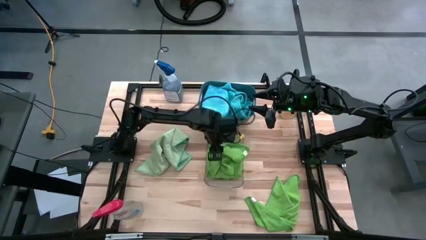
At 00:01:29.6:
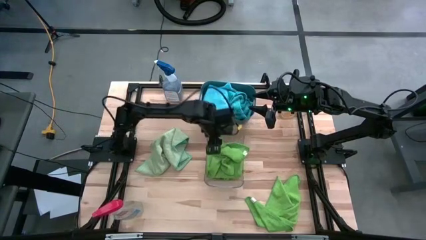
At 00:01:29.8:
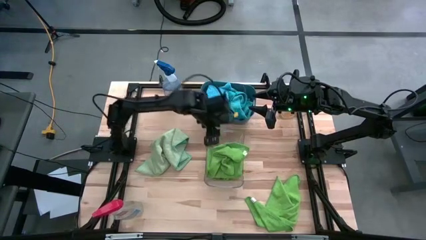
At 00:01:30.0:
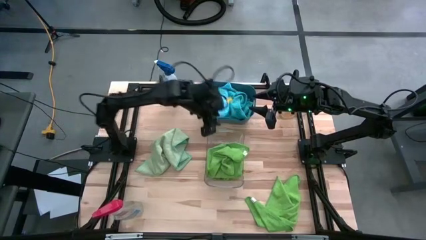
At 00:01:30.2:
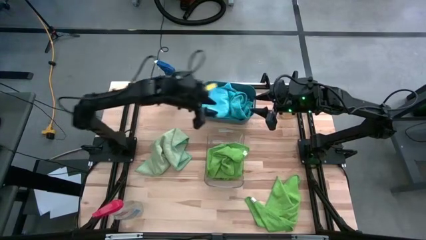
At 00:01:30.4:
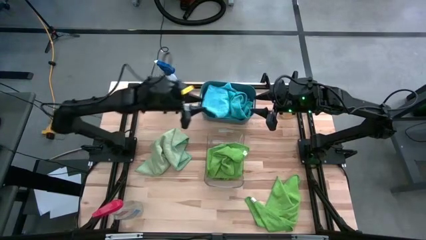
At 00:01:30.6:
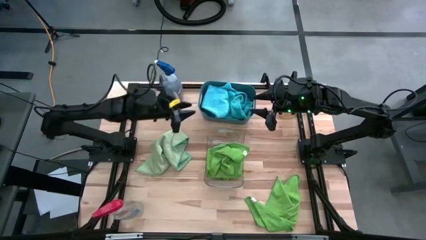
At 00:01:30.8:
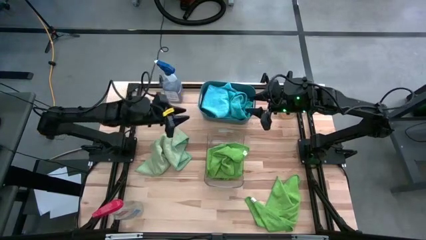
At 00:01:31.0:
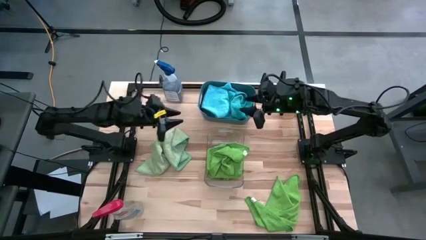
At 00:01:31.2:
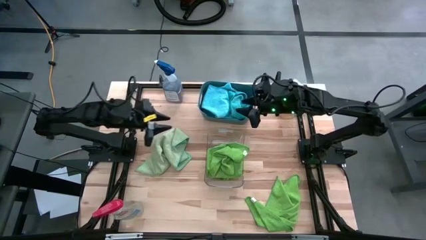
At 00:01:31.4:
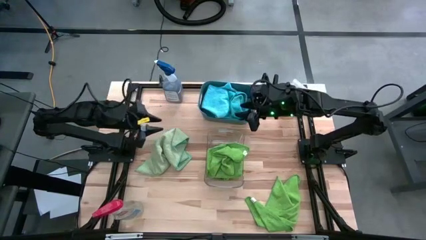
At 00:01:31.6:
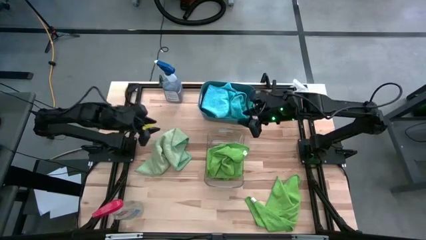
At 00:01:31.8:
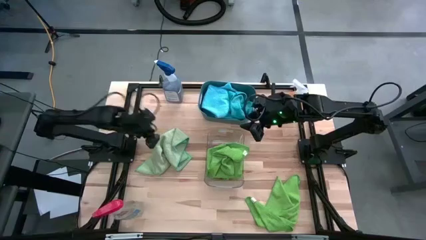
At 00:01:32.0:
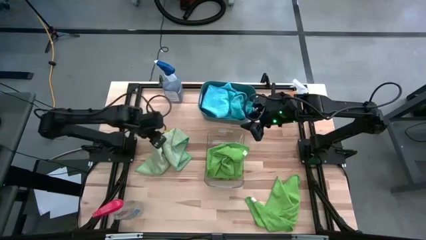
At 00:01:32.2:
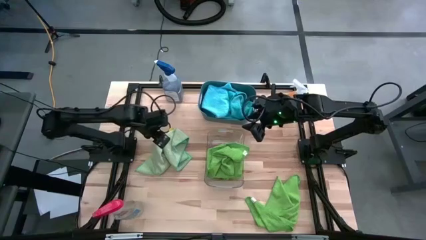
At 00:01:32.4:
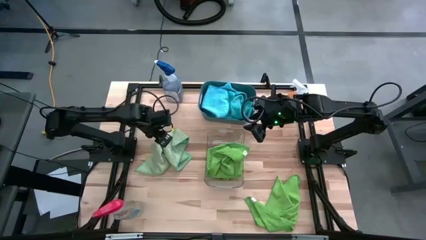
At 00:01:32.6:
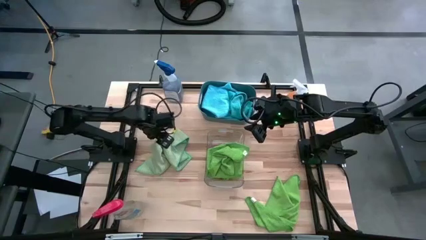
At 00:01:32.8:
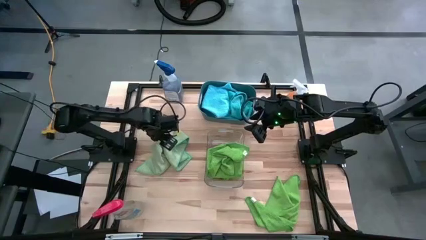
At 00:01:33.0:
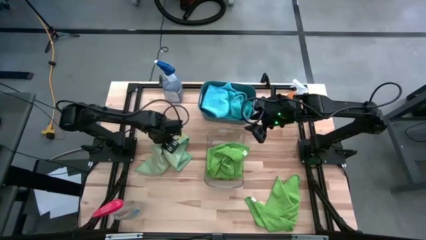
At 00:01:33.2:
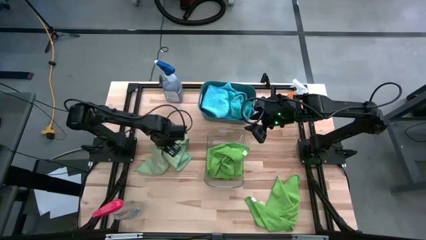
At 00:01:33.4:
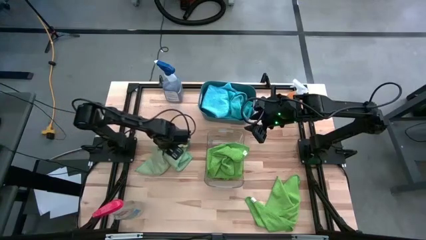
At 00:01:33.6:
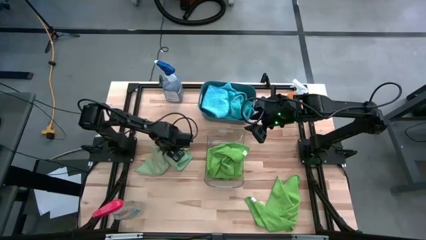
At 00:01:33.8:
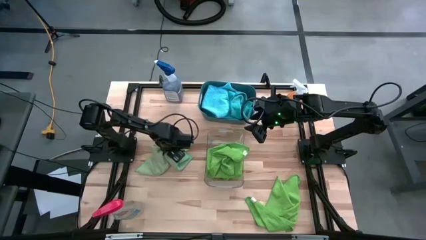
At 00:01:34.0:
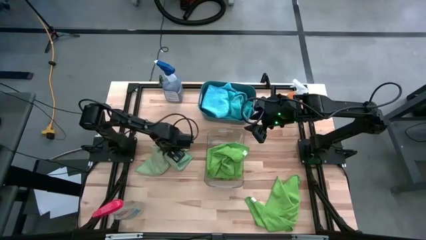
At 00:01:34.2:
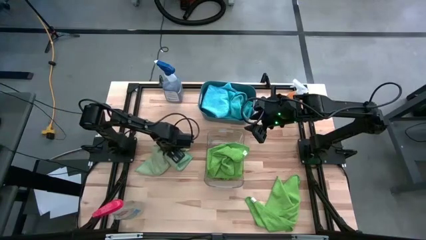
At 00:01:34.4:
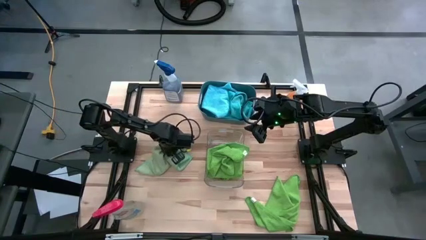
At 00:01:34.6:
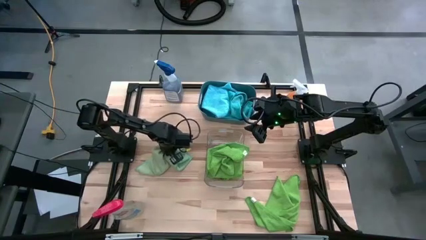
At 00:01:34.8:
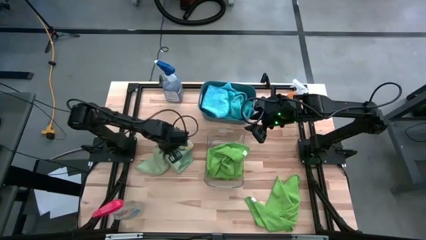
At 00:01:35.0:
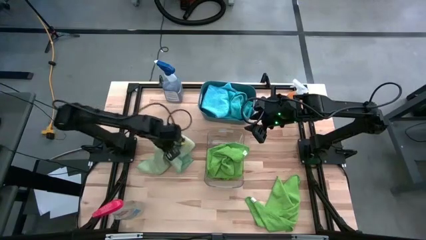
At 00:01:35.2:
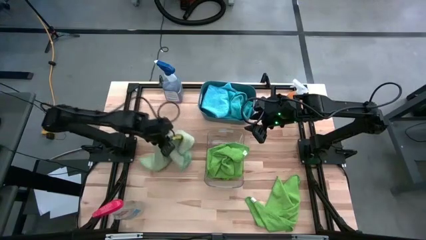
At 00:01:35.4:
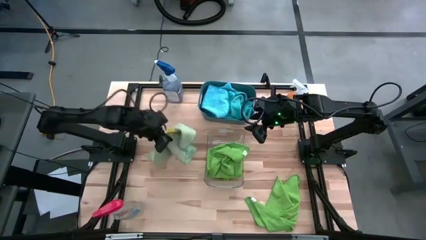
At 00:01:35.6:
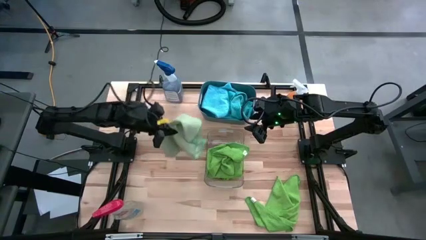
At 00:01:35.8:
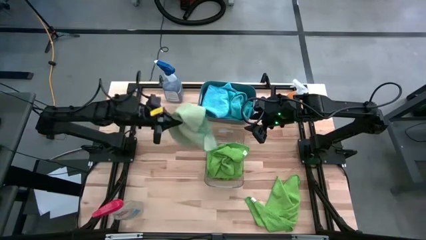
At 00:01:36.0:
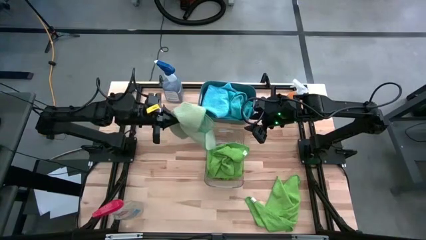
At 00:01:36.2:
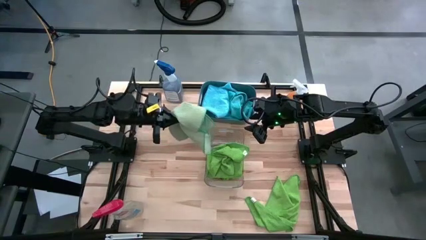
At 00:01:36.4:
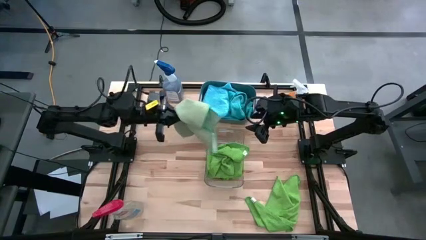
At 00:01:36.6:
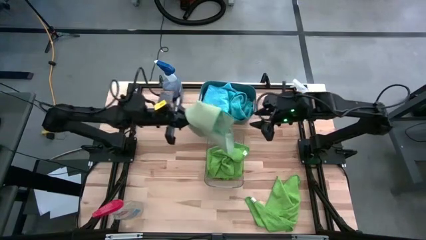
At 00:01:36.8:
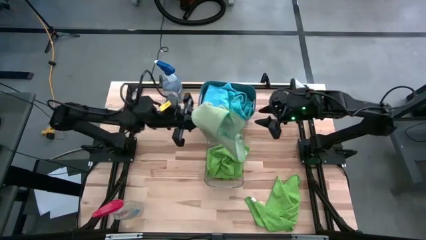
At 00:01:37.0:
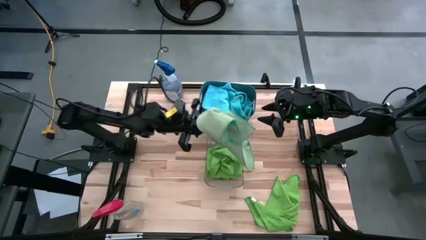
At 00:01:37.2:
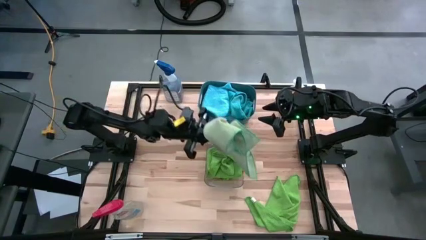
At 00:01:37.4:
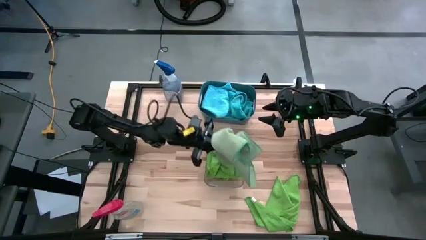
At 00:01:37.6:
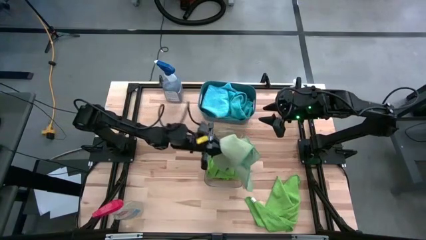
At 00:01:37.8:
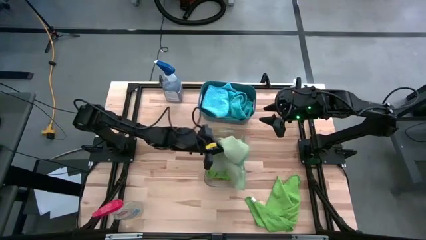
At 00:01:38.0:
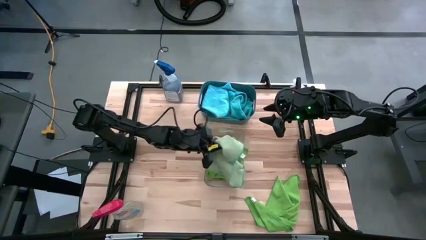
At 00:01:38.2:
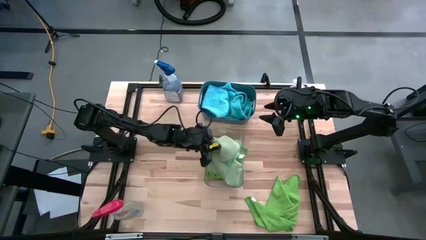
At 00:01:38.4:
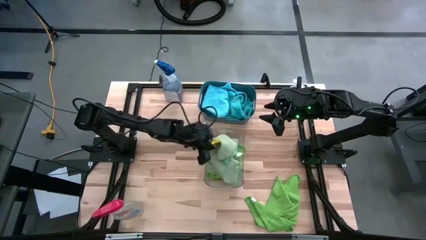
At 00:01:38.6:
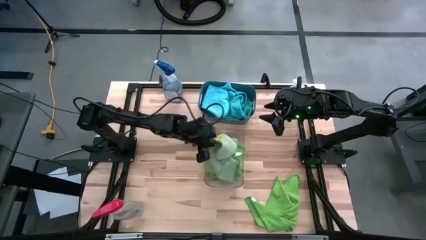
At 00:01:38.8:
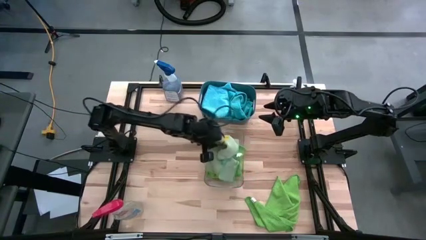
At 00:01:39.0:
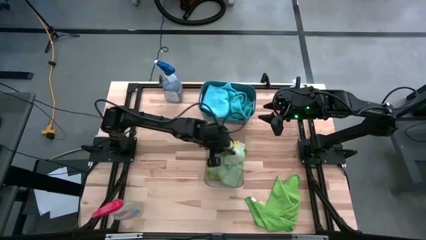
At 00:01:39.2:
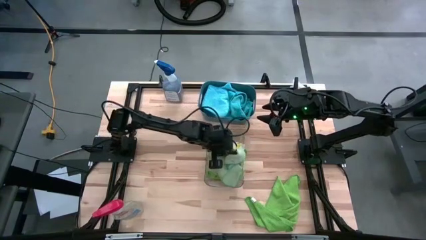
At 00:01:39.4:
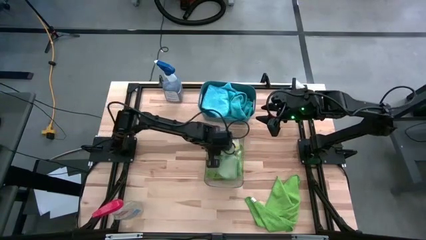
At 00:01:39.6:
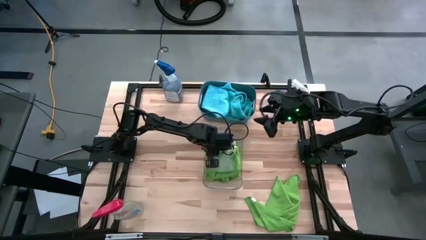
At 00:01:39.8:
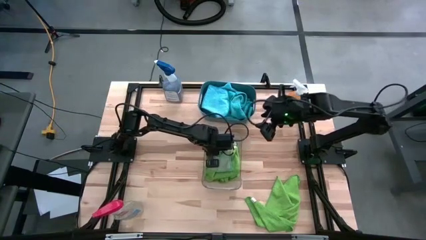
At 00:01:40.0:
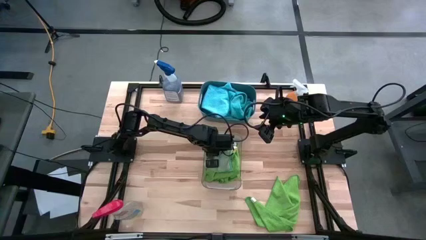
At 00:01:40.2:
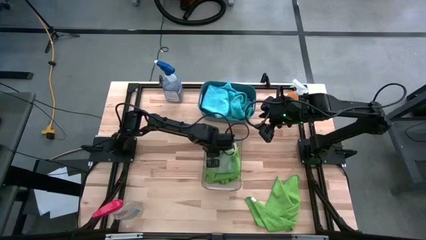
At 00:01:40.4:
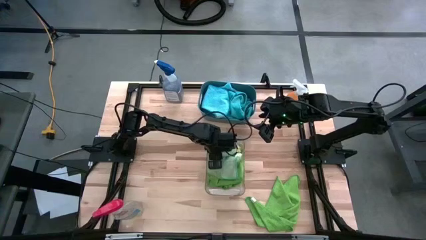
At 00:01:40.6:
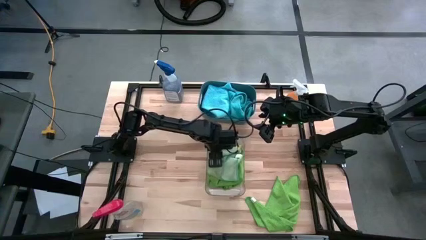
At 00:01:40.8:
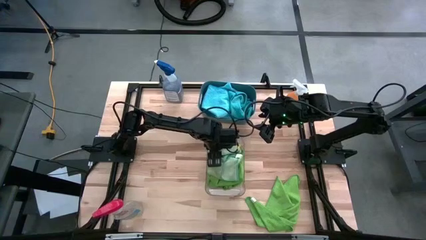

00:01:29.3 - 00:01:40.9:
Task: Sort microfiber towel by color & place in baskets
Put the light green microfiber towel into the transparent bin

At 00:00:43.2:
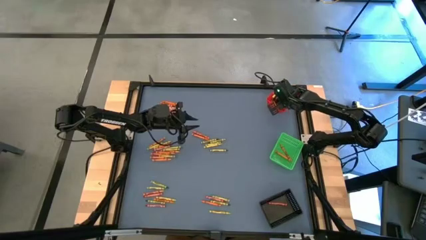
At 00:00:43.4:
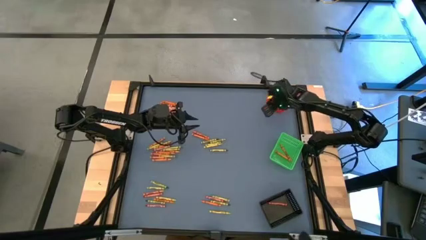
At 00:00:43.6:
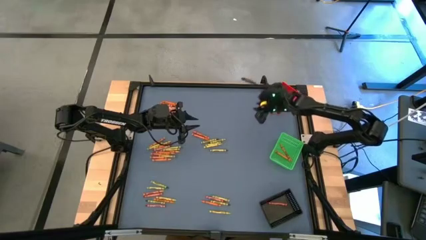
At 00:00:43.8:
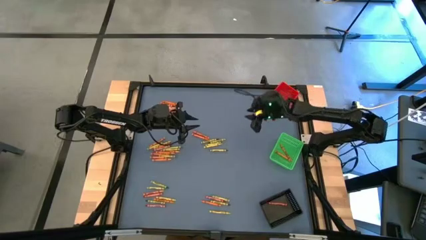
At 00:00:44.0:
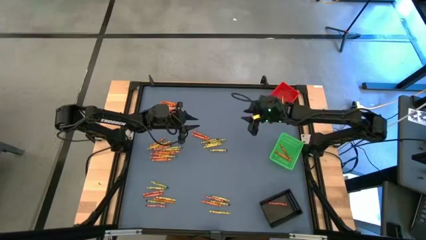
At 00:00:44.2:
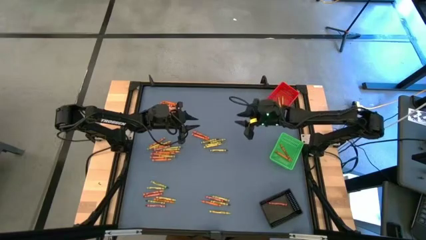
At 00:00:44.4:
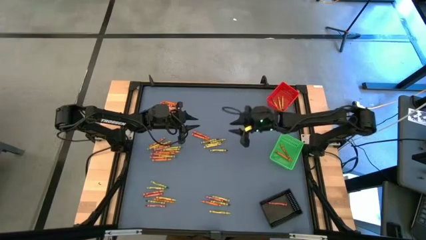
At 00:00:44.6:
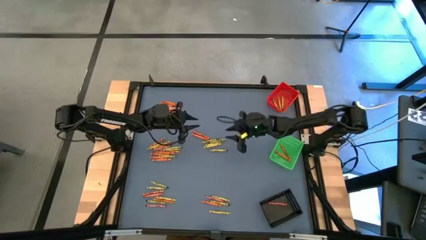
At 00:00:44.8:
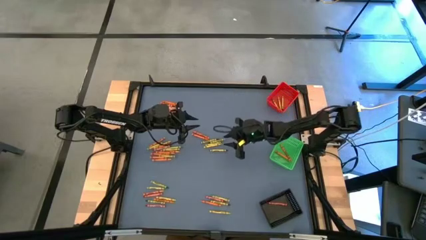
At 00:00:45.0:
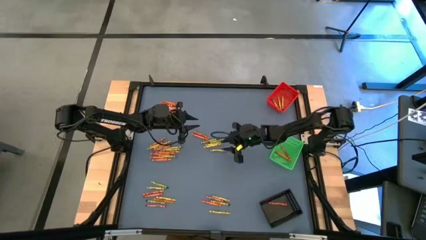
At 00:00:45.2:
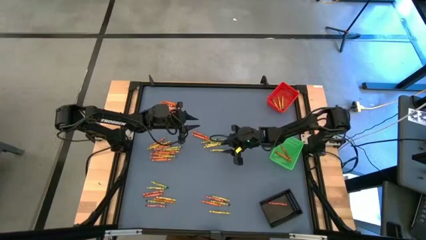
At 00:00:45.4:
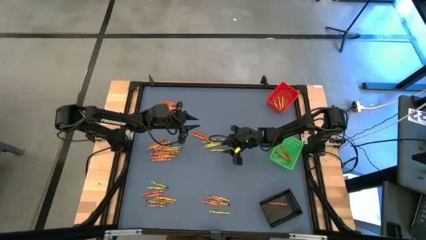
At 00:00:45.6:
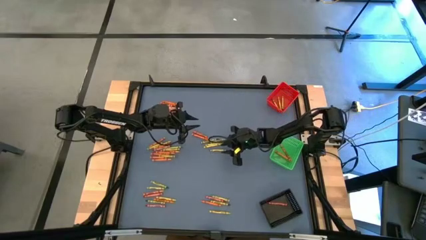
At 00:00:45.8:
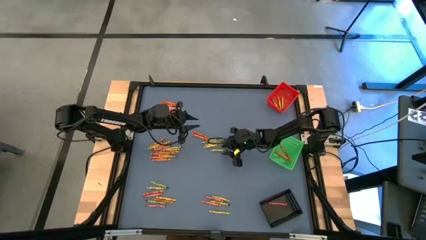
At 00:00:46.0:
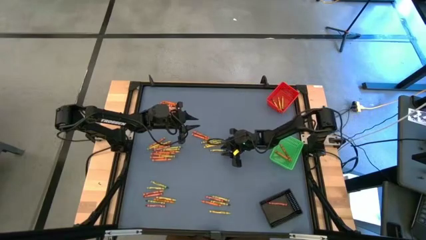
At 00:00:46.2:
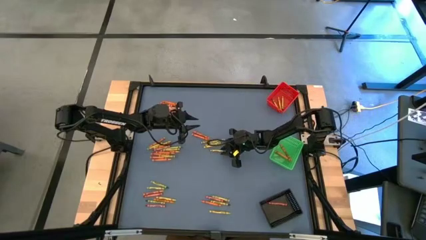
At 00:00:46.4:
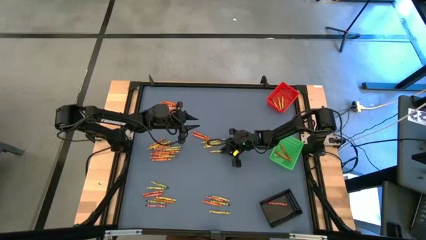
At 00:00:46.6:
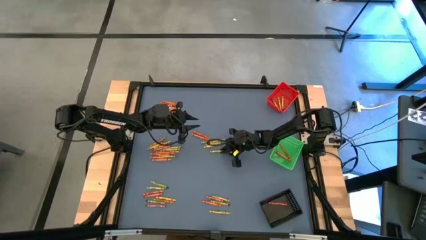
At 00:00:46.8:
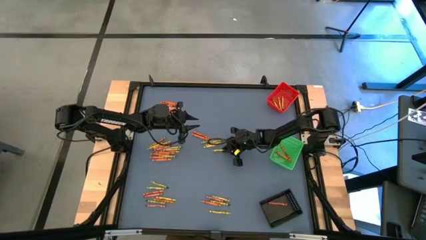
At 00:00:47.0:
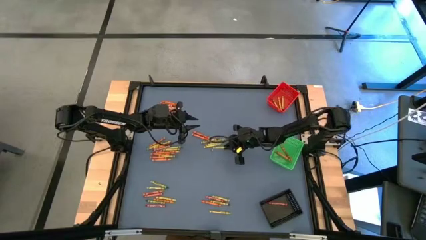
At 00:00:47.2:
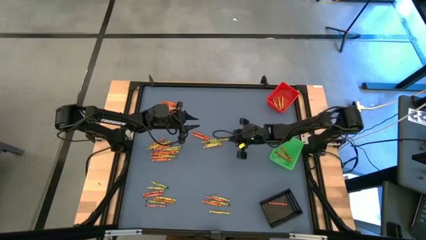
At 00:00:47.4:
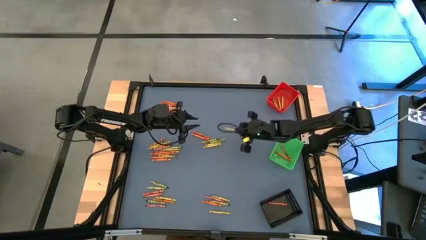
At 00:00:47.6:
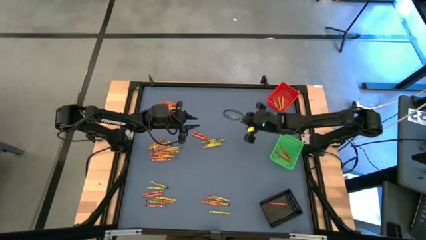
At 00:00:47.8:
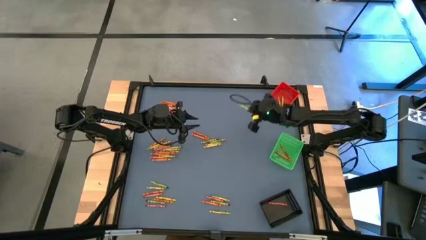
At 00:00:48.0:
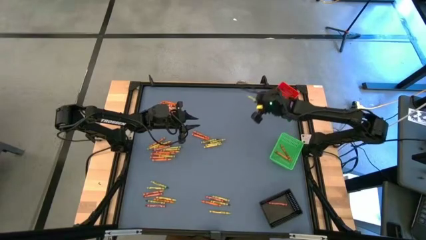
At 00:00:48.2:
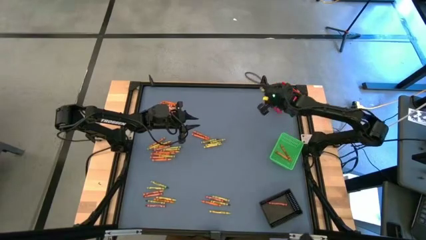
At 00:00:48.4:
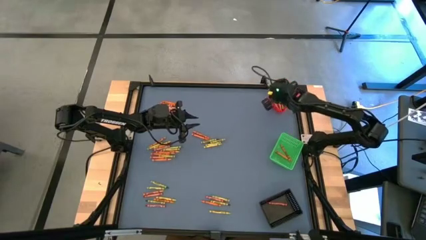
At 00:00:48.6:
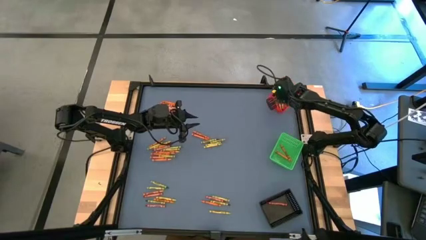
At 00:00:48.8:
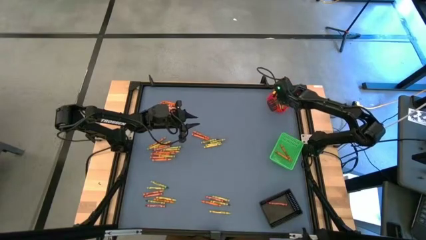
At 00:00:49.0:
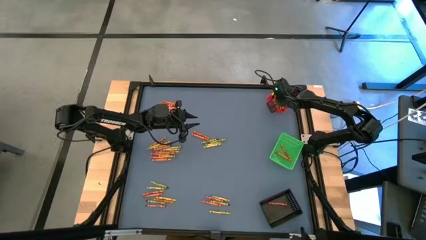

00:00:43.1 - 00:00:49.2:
Task: Sort crayons
Put the green crayon into the red bin
